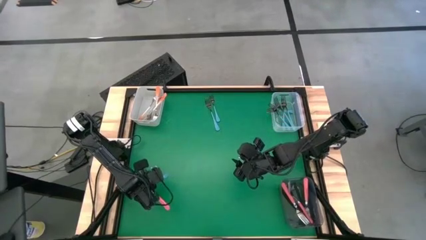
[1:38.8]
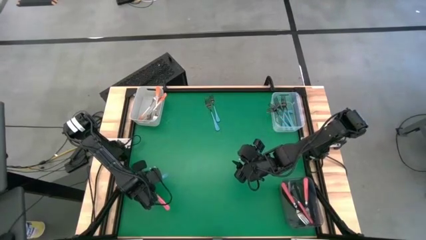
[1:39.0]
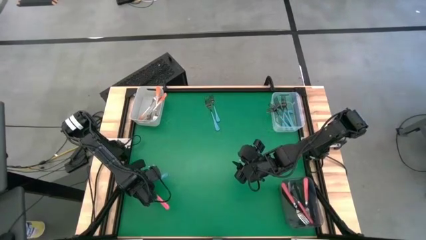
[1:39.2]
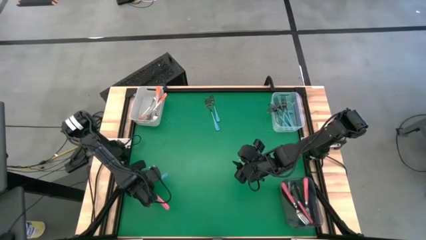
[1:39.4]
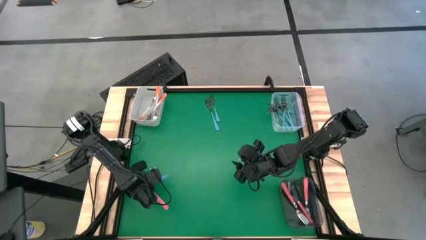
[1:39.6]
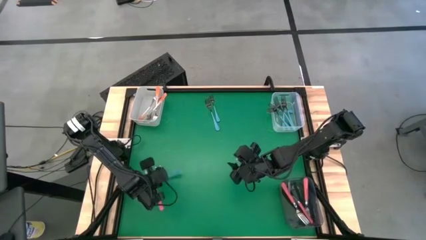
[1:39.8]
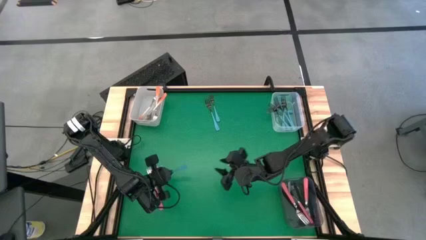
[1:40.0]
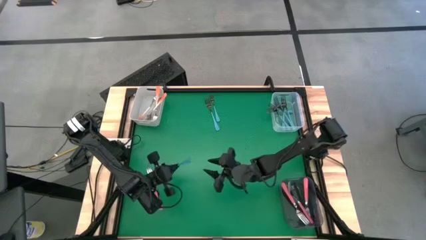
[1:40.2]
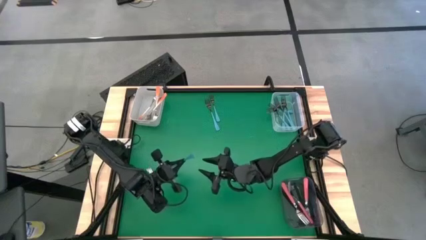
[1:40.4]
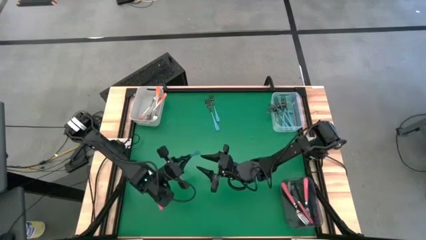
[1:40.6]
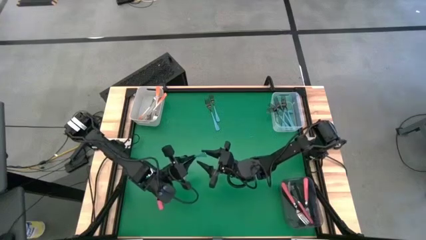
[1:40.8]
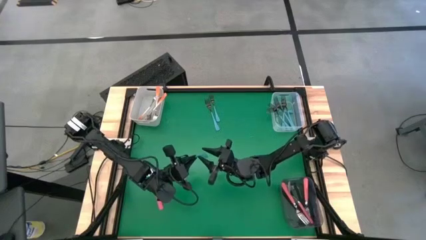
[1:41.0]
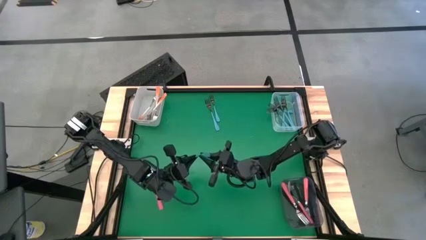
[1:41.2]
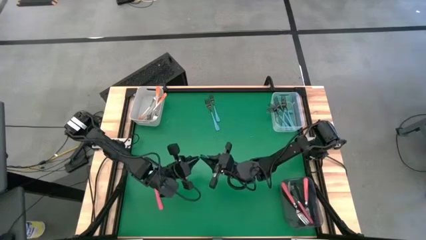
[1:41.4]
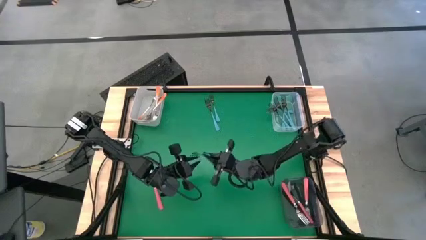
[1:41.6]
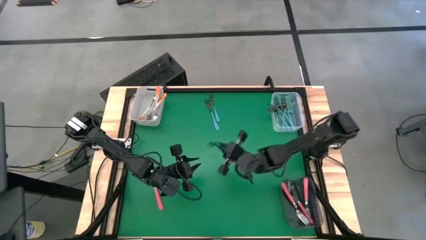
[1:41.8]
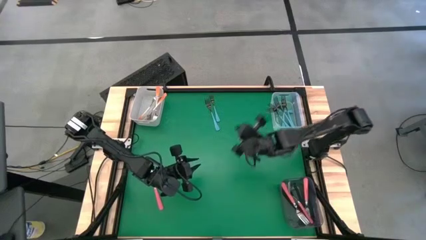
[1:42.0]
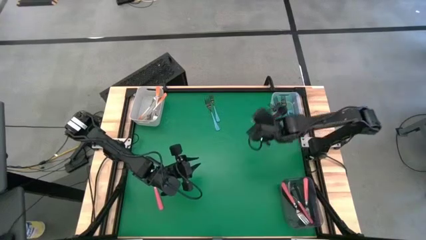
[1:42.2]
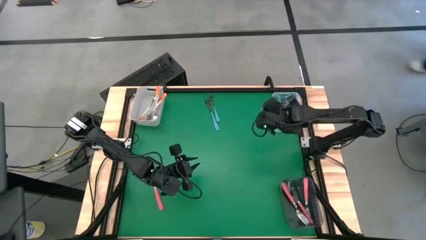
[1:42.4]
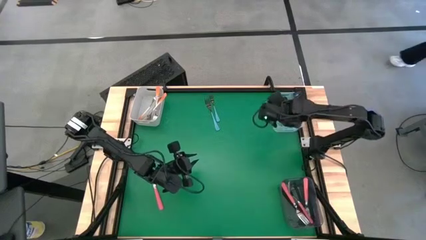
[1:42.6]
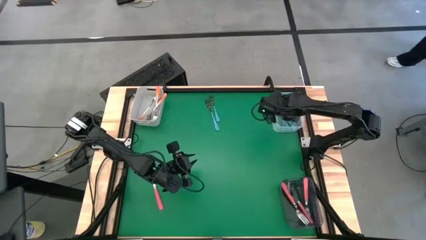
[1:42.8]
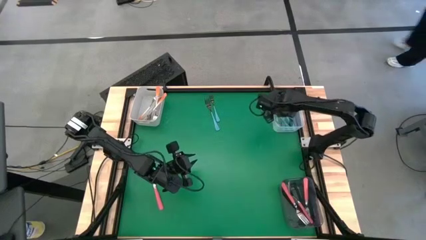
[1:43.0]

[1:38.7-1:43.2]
Task: Sort silverware by color (type)
Put the blue fork into the transparent bin

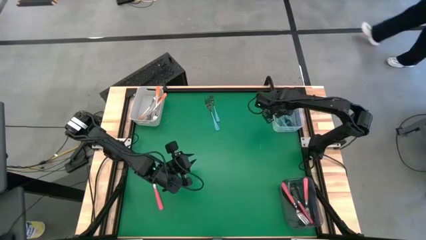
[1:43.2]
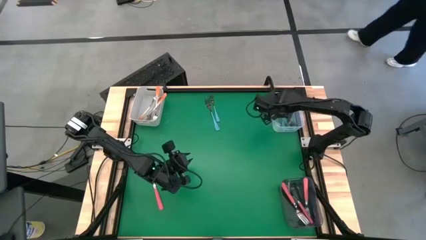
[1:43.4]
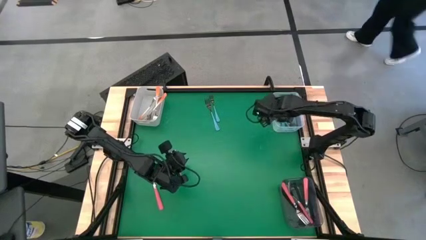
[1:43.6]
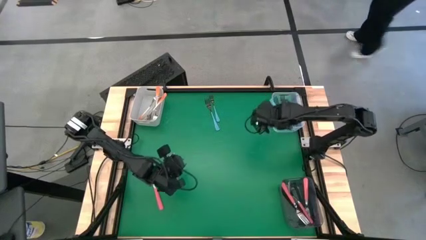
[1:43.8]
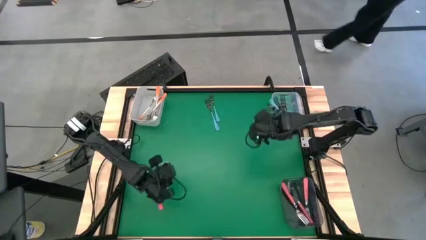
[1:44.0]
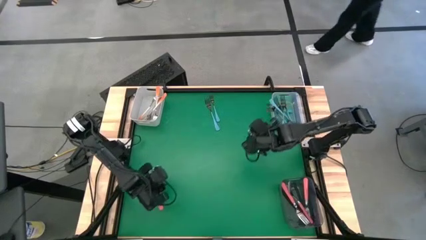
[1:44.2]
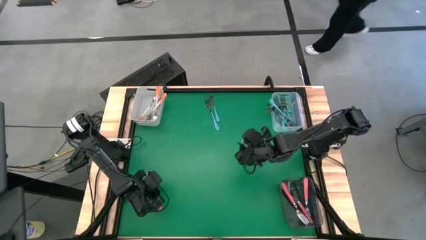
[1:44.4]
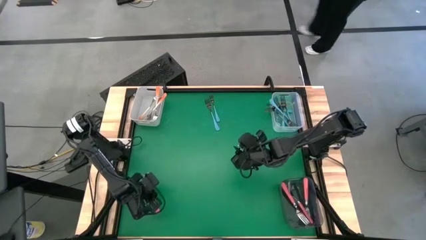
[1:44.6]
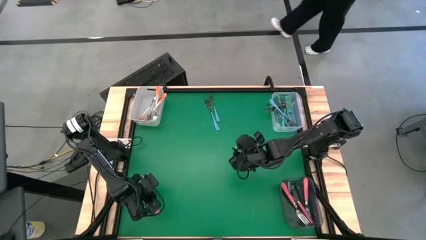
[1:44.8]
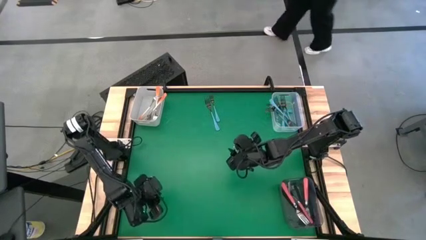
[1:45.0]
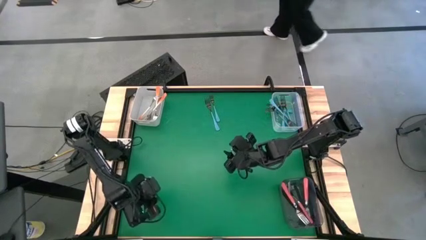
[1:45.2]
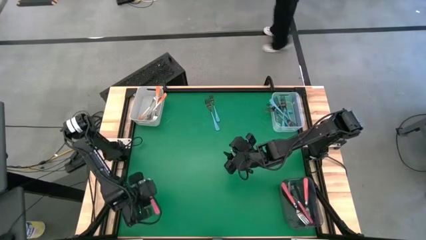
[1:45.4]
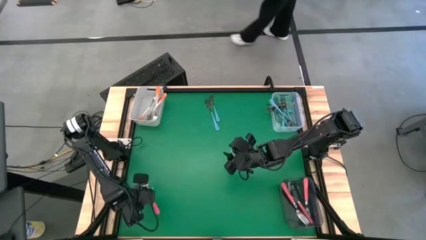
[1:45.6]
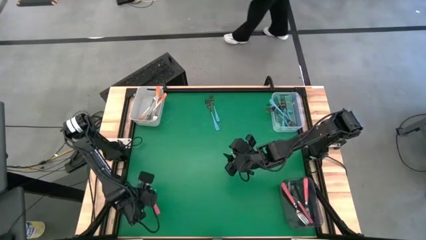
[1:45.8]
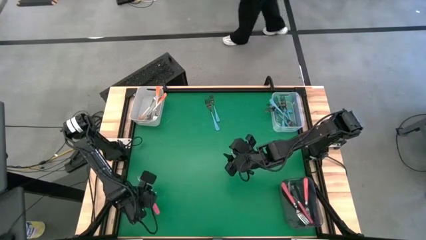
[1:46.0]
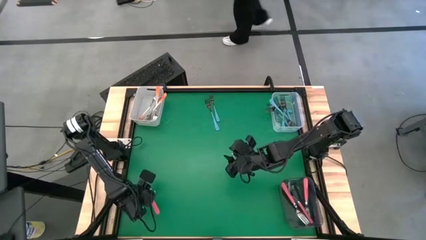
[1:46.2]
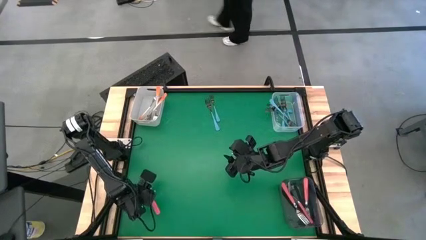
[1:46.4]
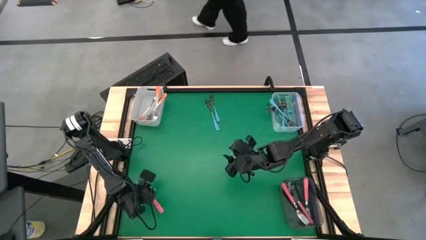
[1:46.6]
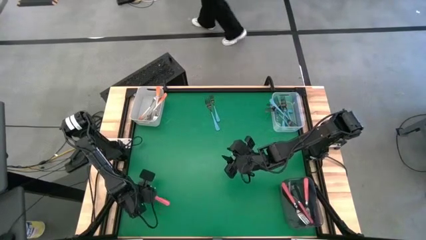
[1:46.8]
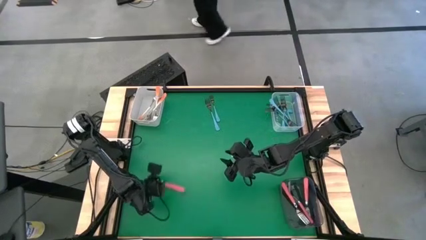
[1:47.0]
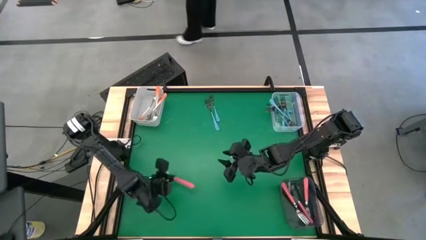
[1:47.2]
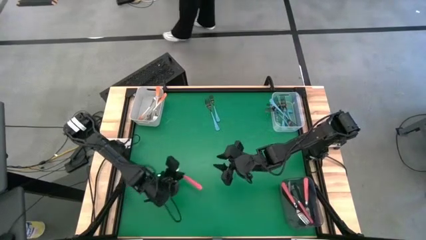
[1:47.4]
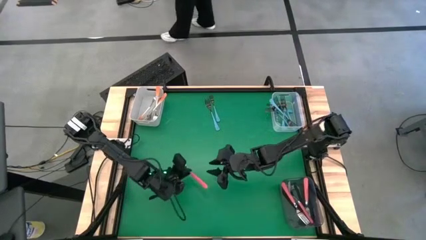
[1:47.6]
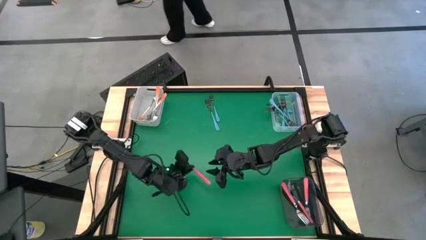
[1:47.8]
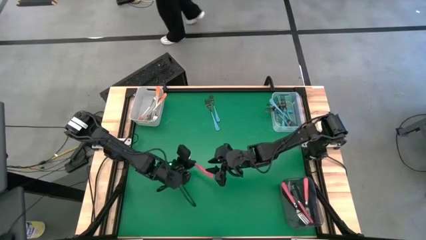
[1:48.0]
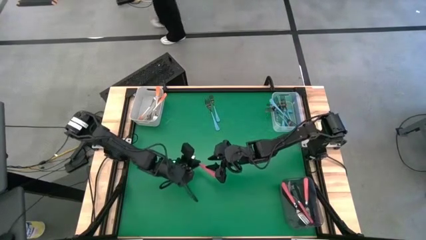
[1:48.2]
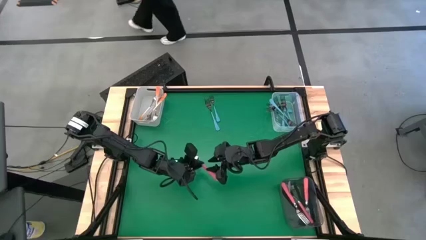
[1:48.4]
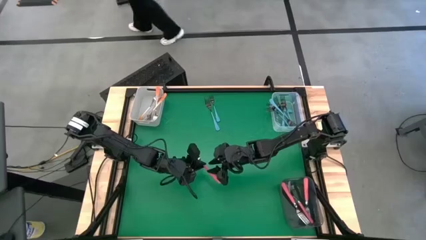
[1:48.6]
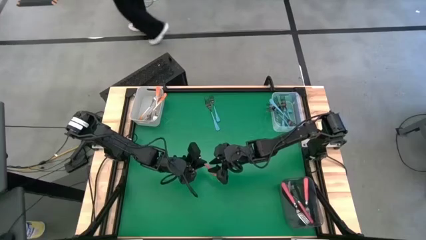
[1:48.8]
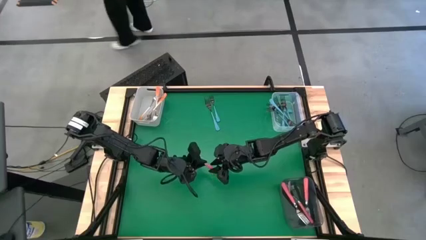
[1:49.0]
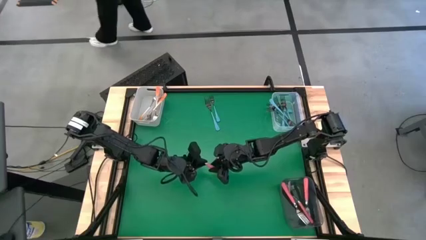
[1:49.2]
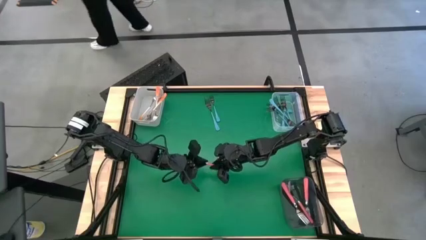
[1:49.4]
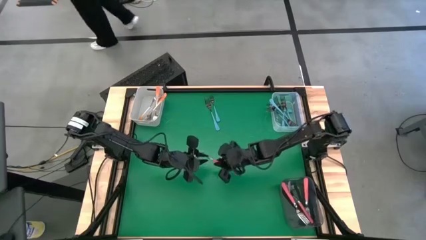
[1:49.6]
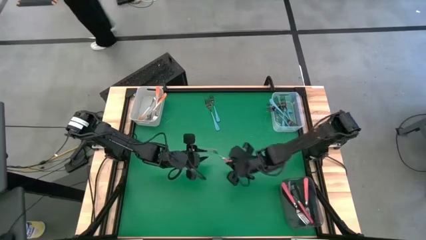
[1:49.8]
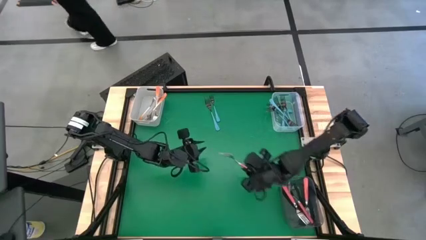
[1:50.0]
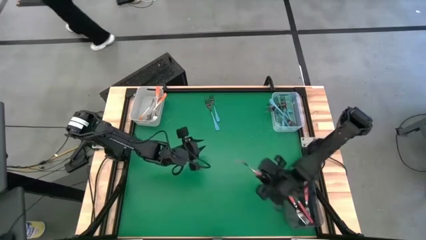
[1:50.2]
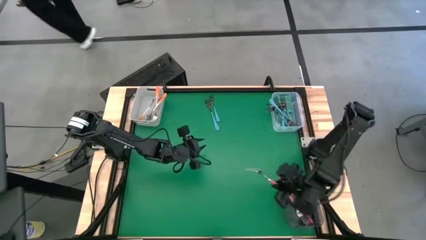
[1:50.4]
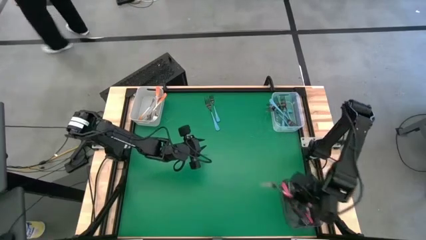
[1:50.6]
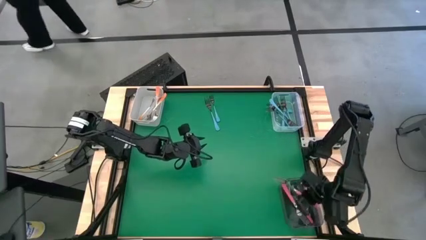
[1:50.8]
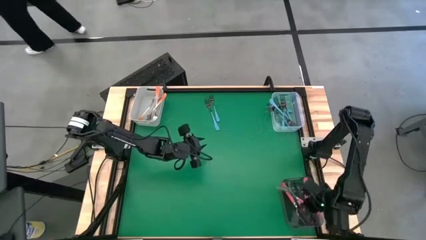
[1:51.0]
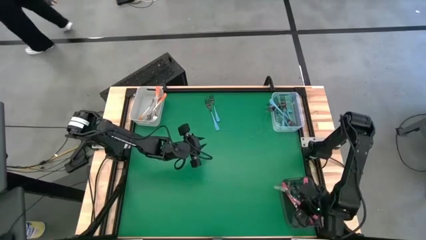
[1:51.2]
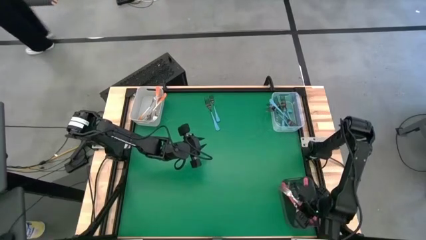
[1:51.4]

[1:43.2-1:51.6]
Put the pink fork into the black bin
